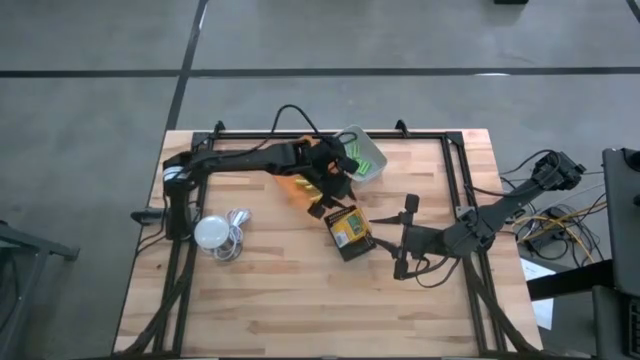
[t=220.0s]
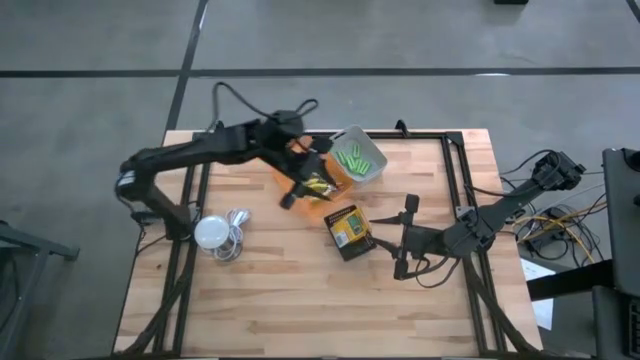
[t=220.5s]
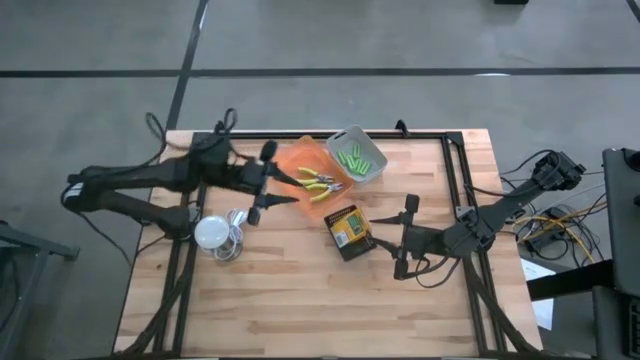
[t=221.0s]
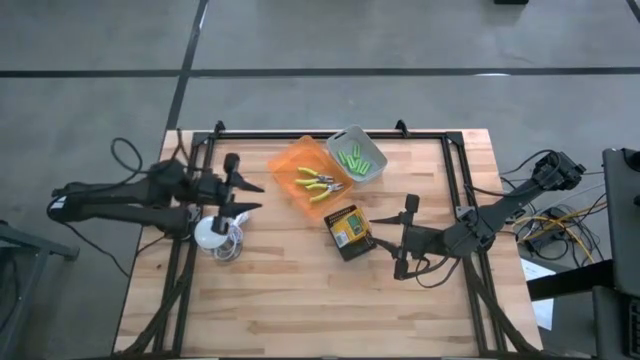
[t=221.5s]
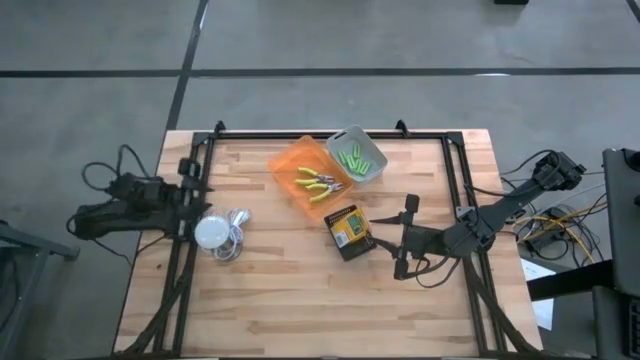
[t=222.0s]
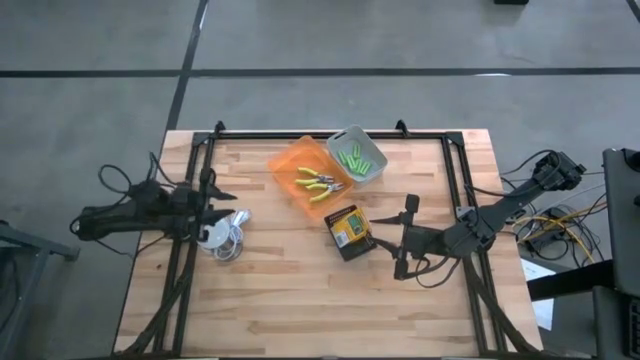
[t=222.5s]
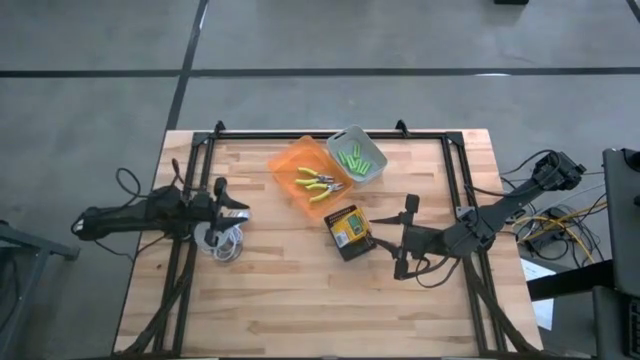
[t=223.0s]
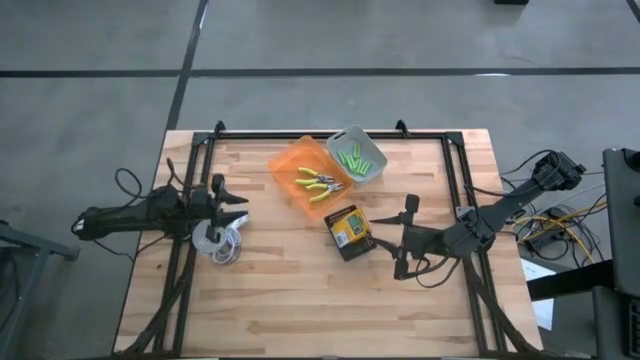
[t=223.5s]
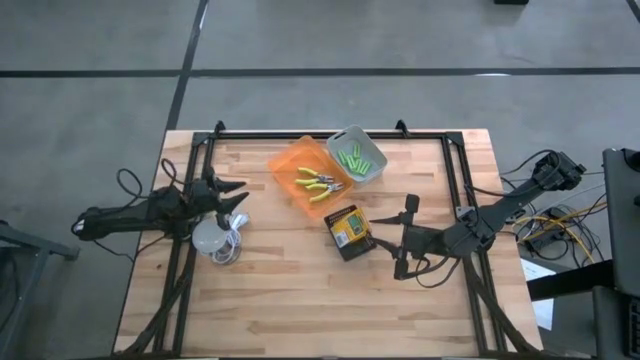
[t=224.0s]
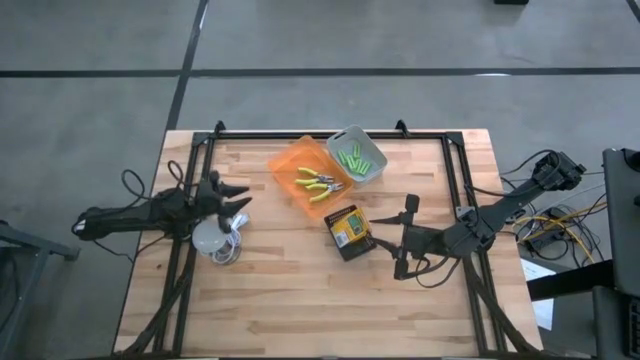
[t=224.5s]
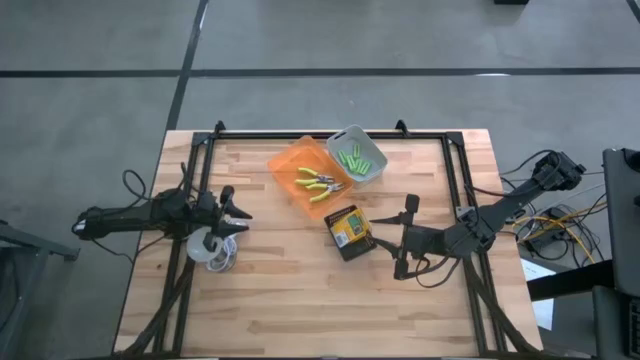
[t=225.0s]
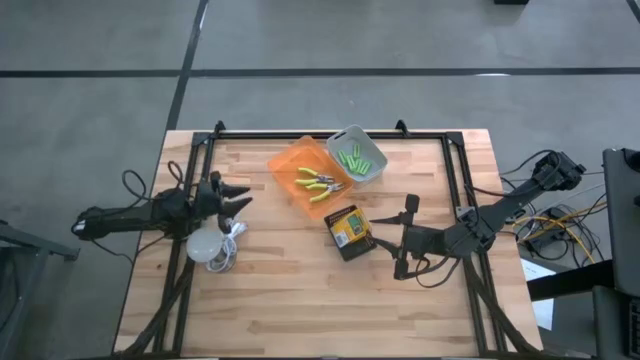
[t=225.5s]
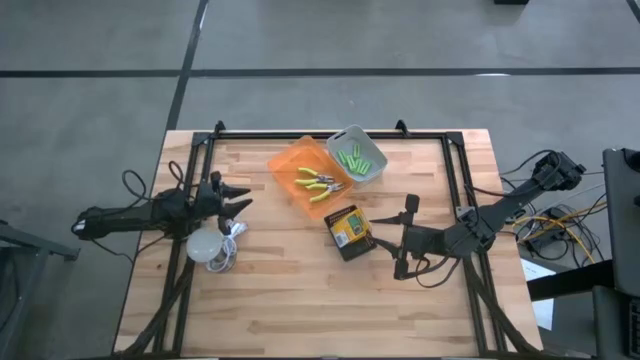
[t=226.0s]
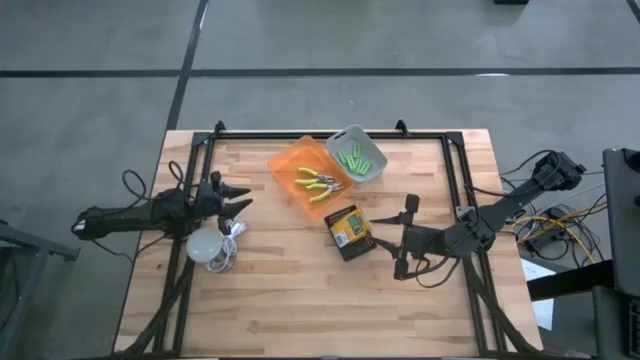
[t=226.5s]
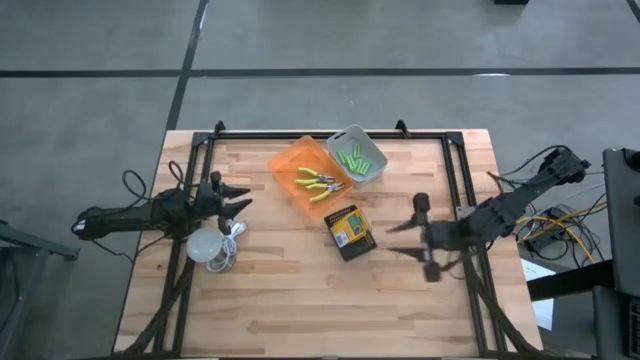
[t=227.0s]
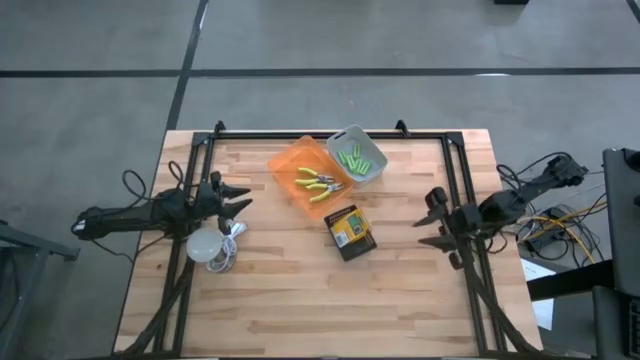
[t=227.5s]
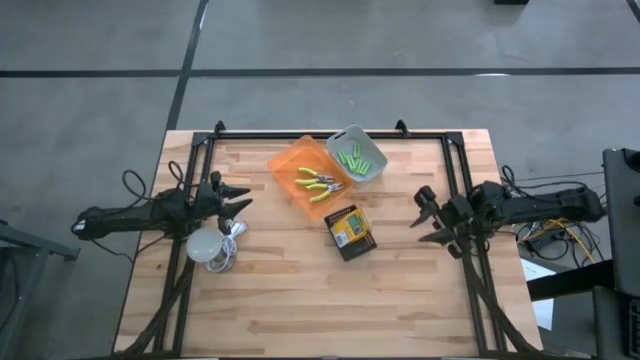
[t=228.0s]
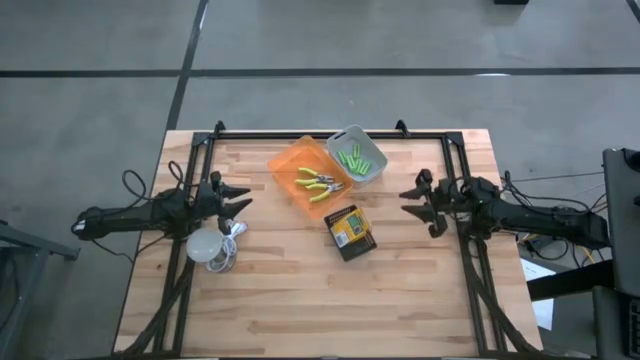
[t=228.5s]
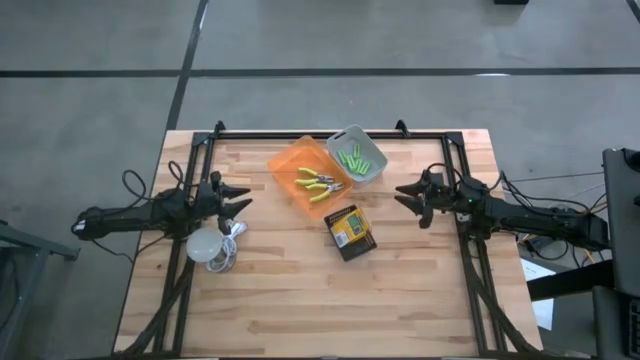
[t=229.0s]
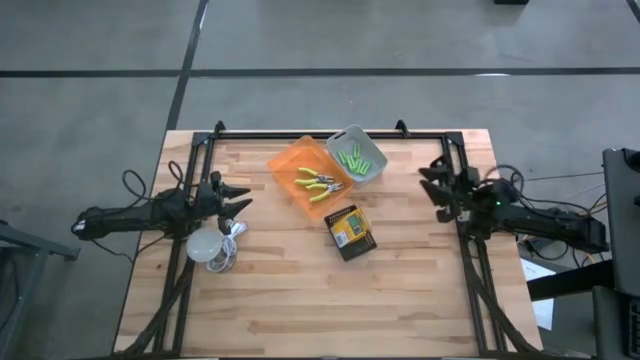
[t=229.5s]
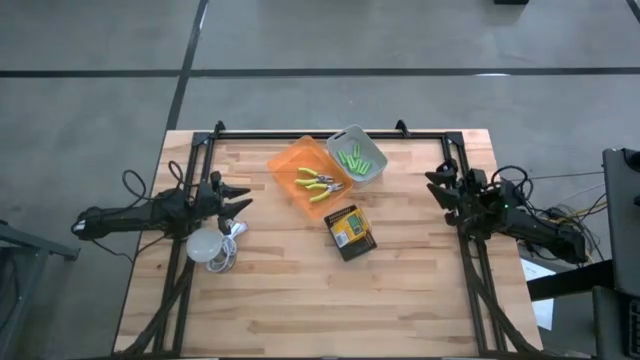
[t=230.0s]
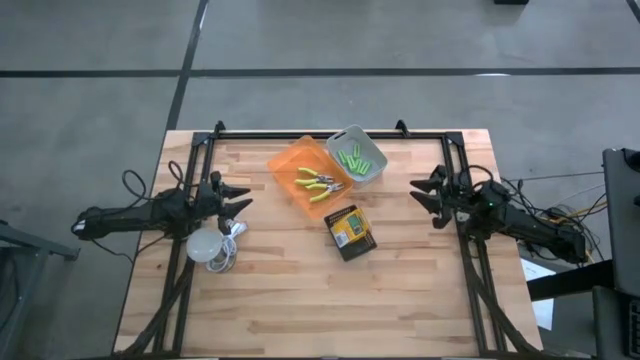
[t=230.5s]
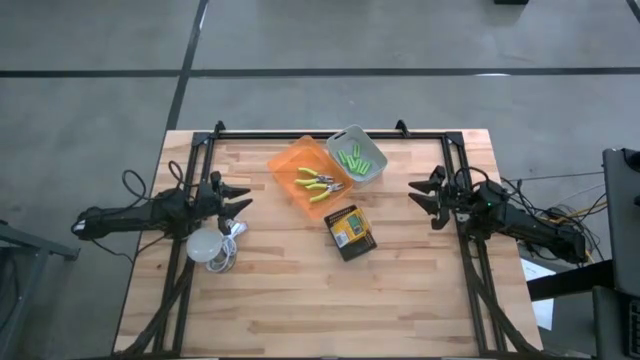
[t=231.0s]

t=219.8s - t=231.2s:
Task: Pick & Place School Supplies
Return to Home Position

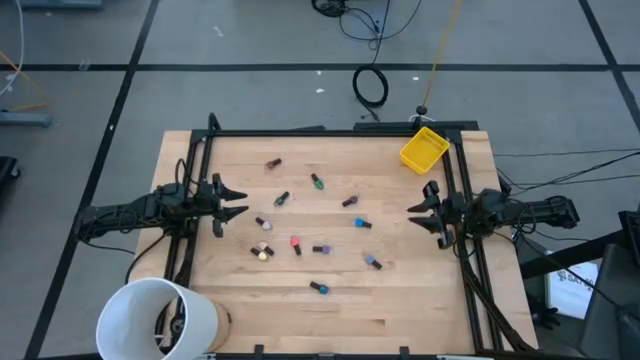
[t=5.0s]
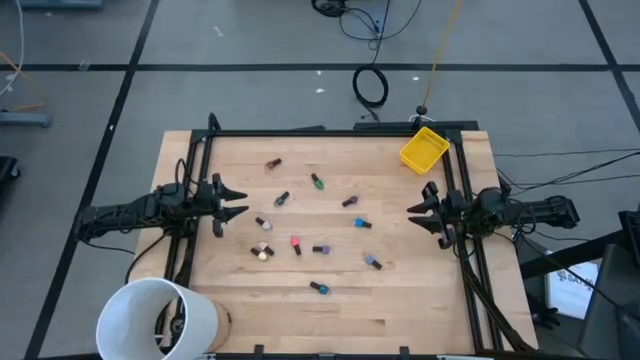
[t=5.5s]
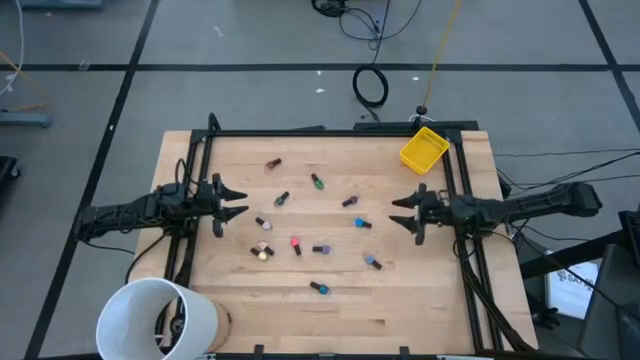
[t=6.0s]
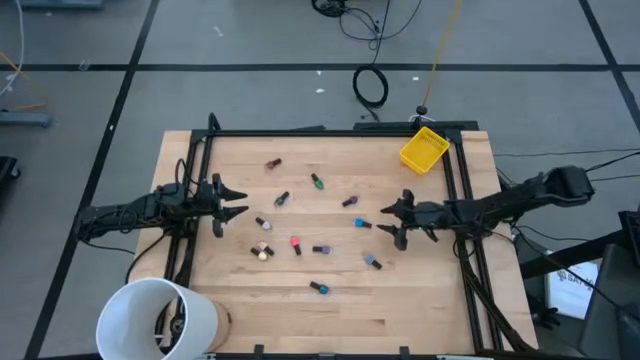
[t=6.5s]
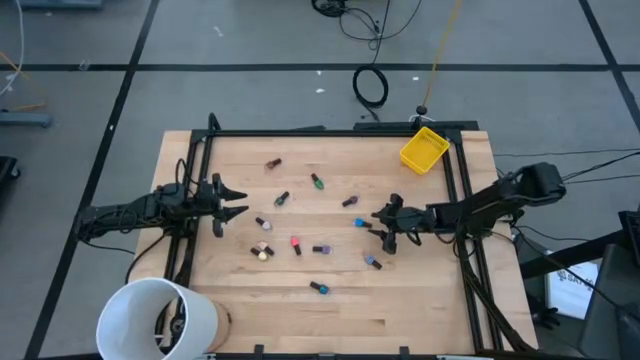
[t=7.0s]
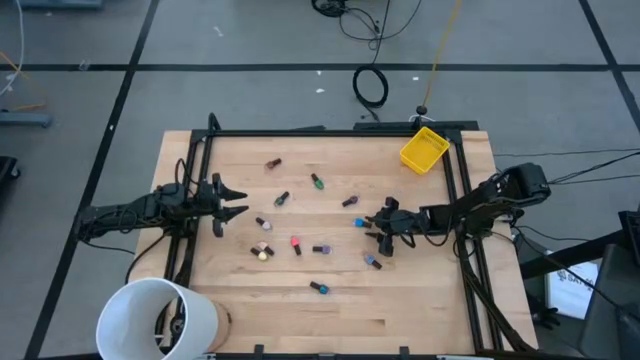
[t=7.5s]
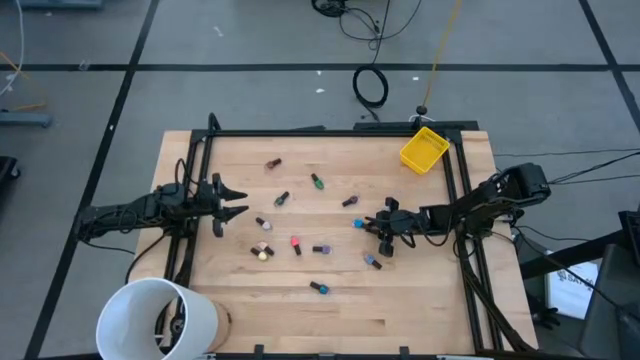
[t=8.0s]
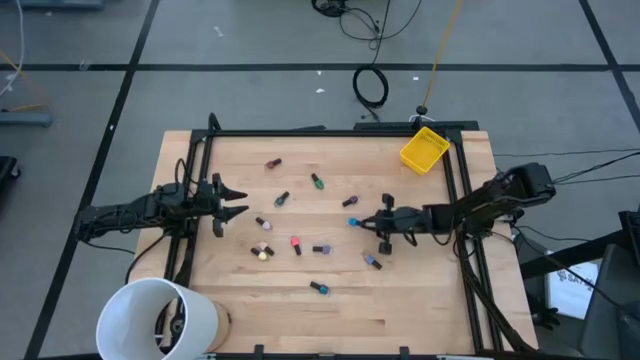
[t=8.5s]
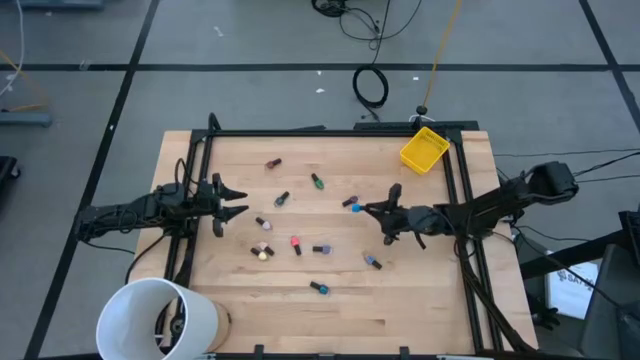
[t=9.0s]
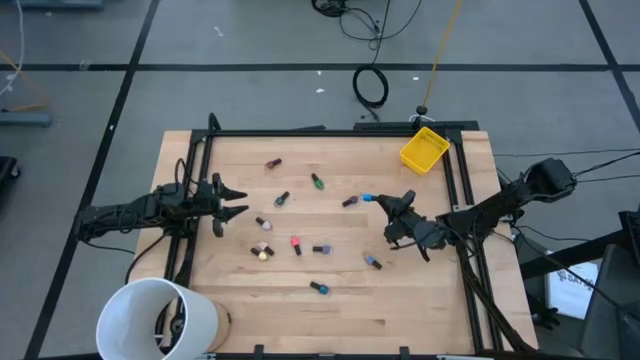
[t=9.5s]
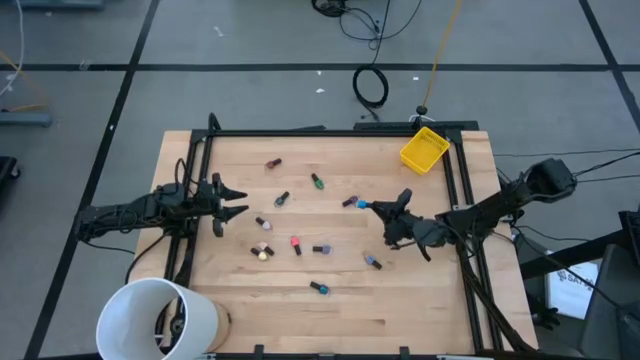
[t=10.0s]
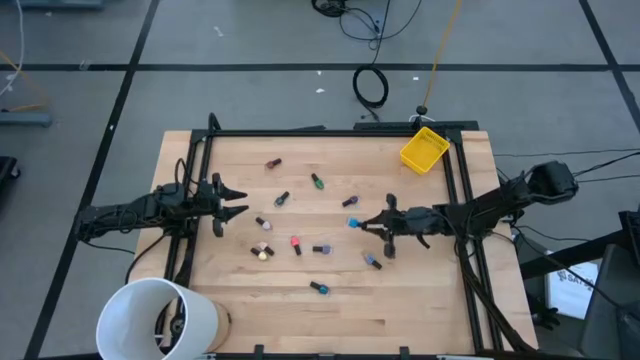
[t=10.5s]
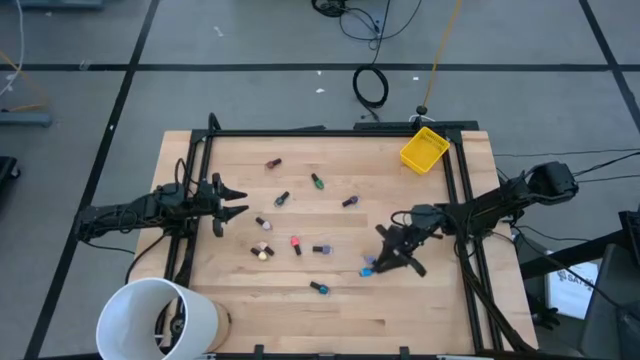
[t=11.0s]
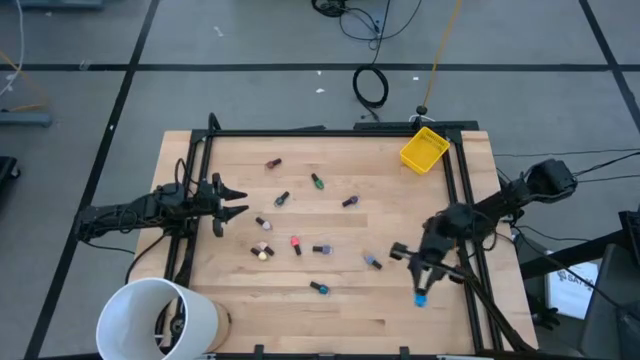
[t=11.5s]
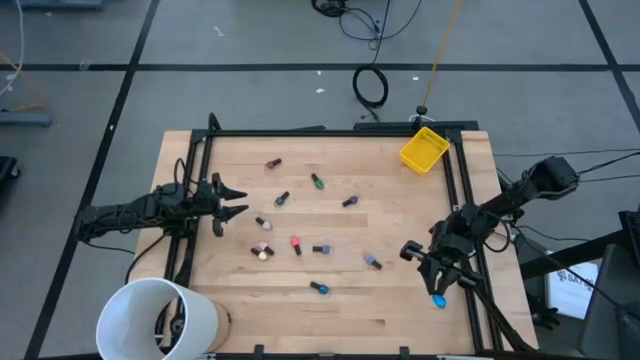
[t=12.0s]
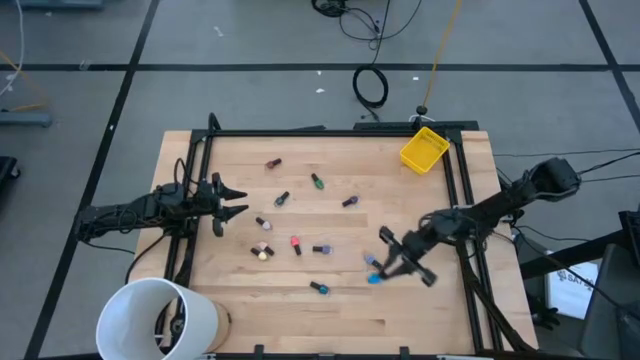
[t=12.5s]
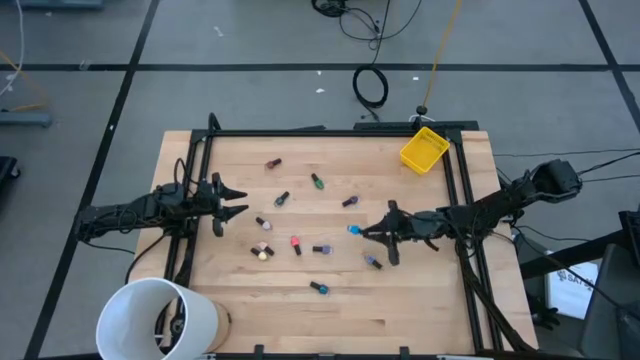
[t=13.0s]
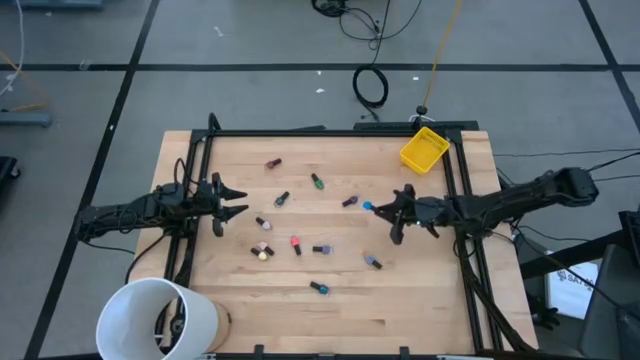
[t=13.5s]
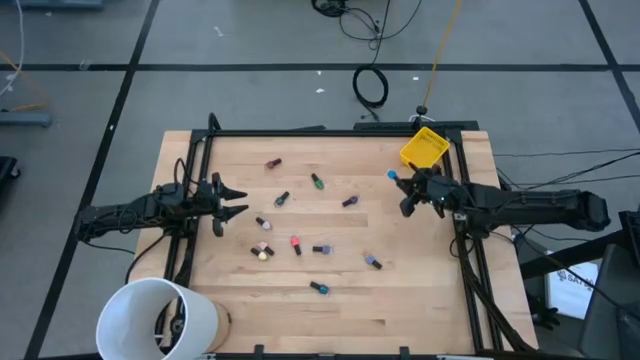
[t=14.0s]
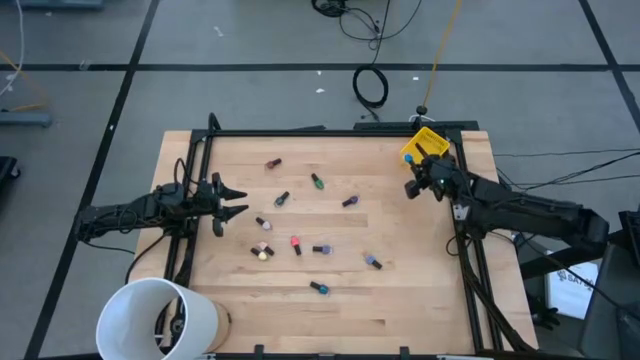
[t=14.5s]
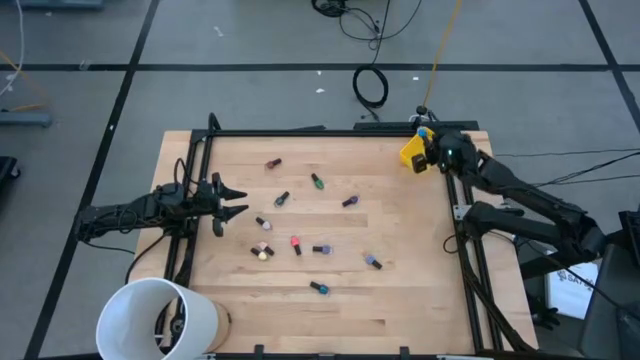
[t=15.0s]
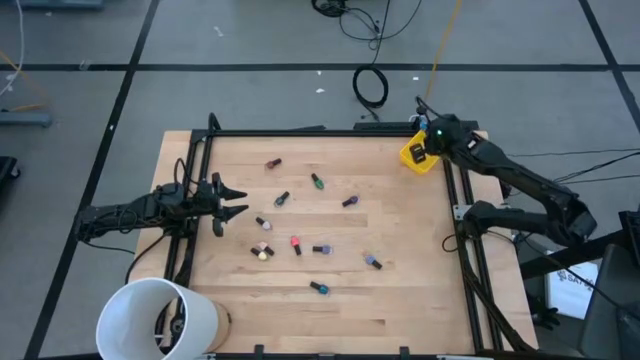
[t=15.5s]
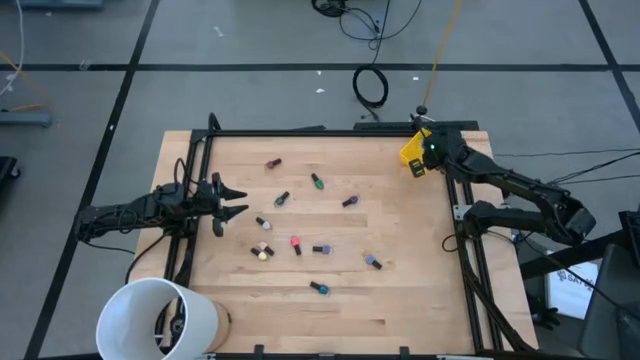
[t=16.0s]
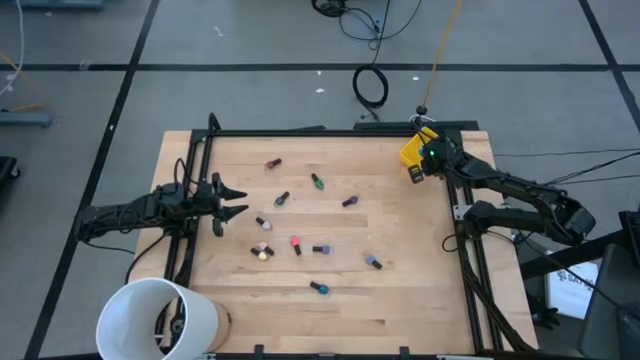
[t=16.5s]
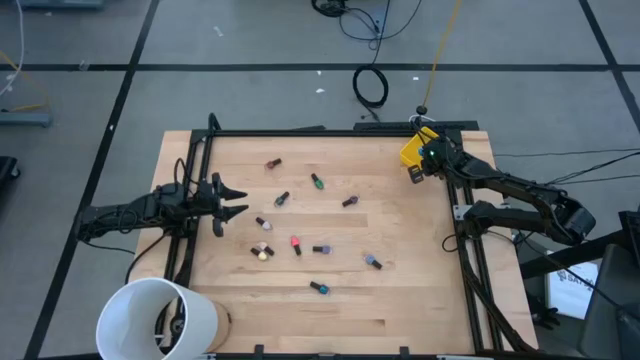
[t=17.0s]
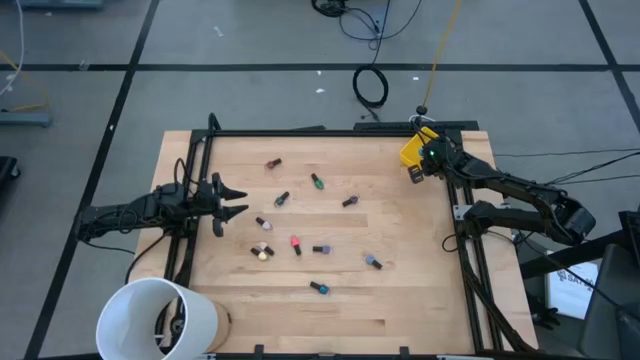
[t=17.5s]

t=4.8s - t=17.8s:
Task: Pick & Place Nail Polish
Put the blue nail polish bottle into the yellow bin
